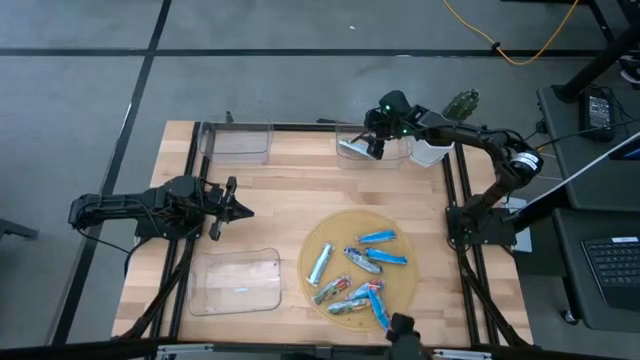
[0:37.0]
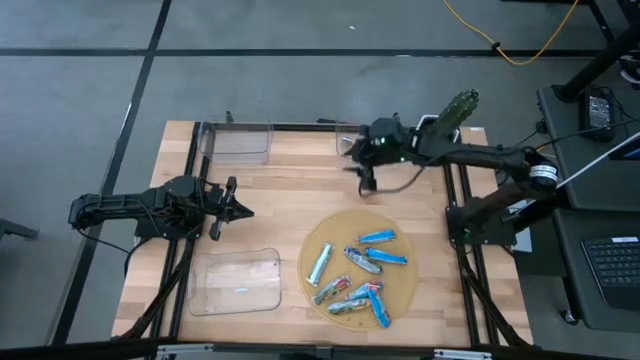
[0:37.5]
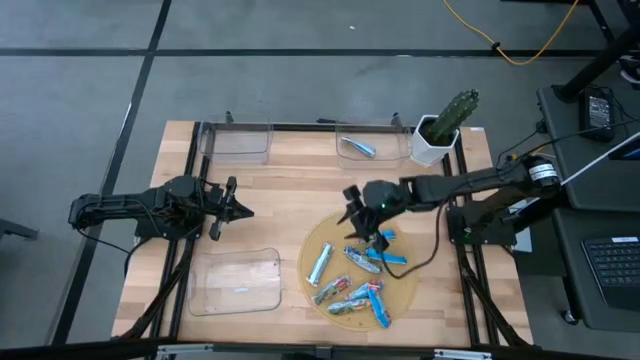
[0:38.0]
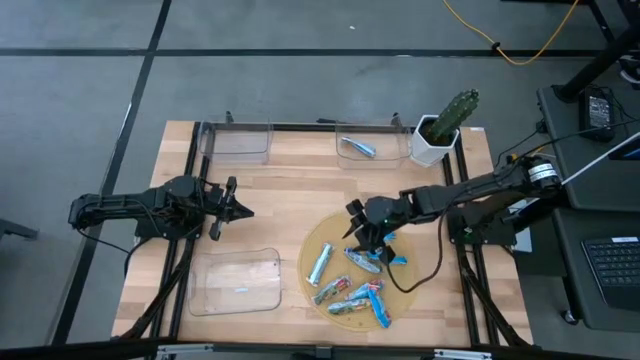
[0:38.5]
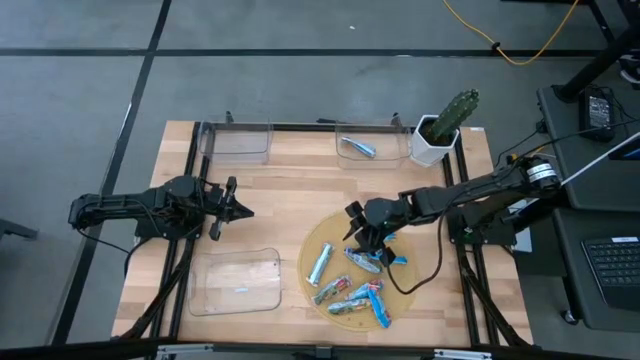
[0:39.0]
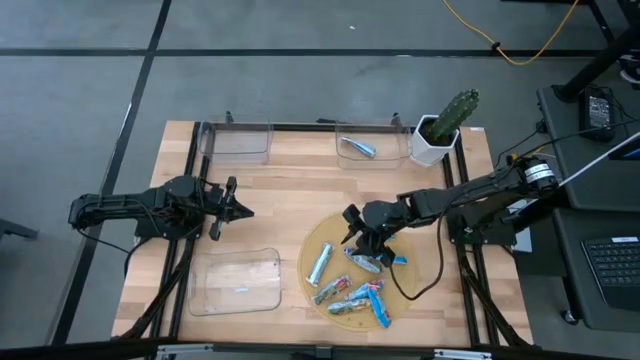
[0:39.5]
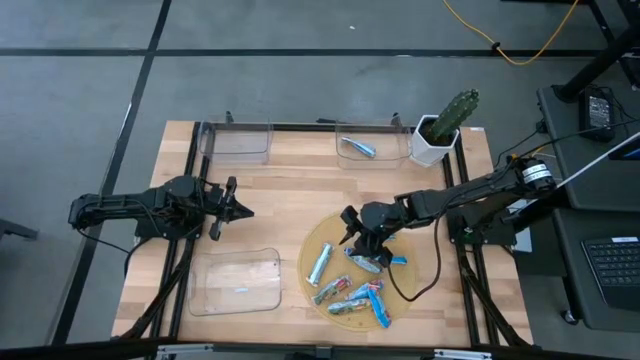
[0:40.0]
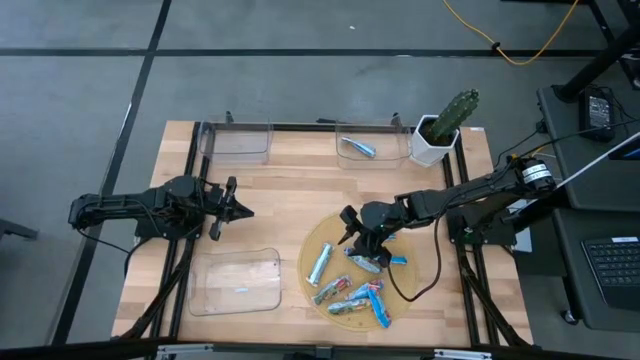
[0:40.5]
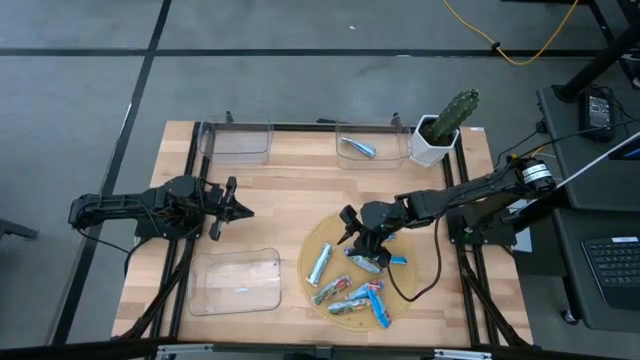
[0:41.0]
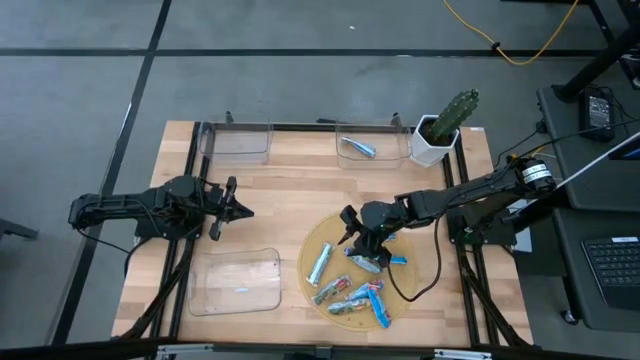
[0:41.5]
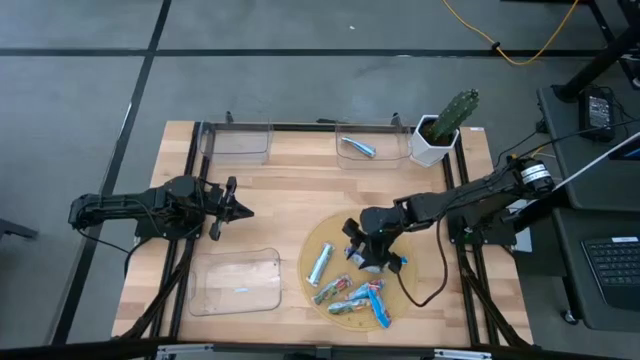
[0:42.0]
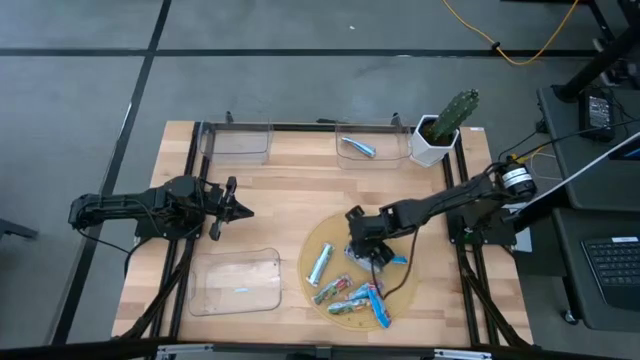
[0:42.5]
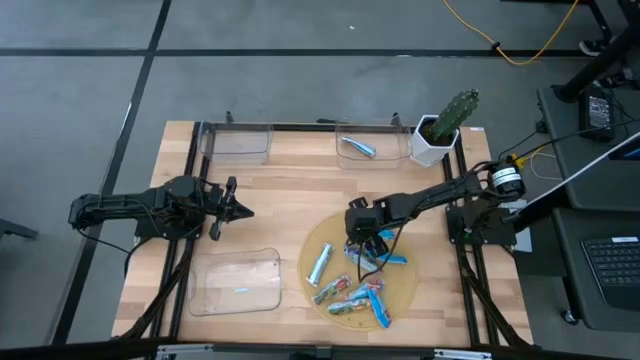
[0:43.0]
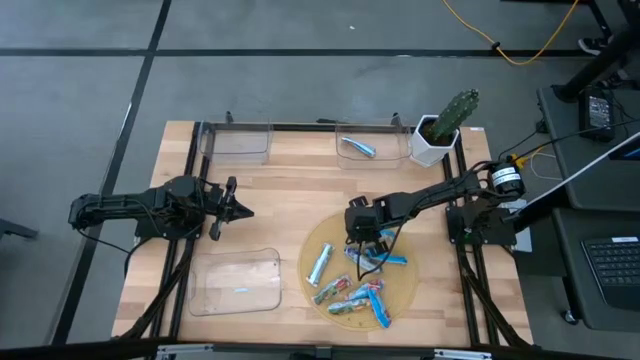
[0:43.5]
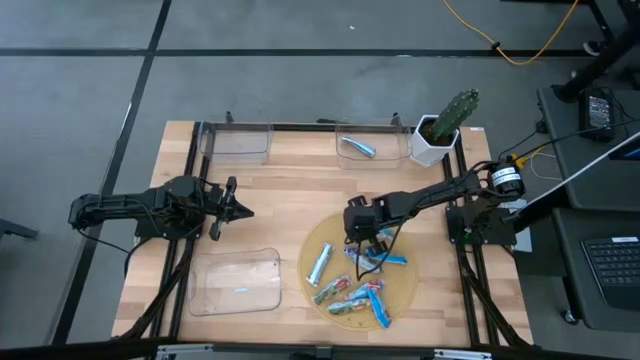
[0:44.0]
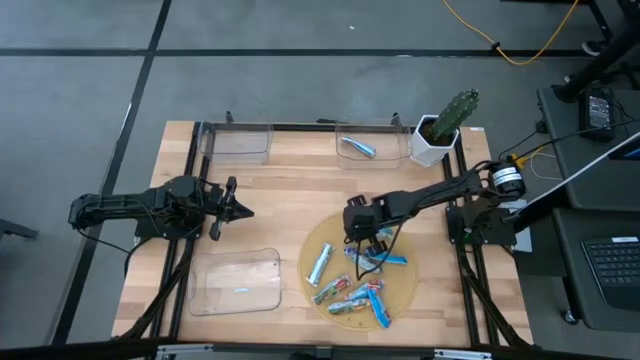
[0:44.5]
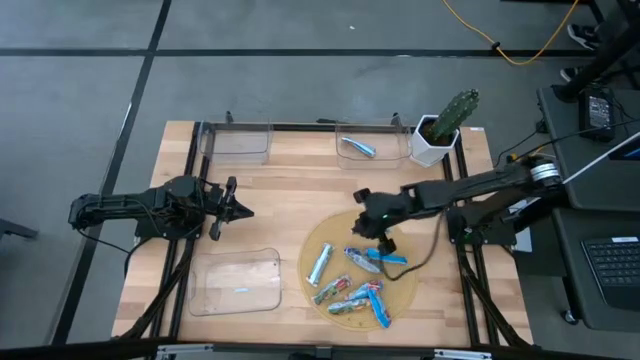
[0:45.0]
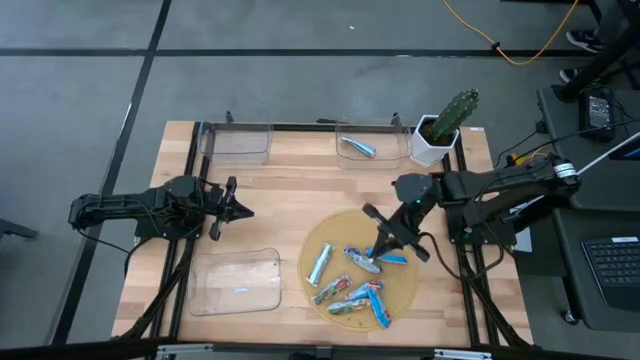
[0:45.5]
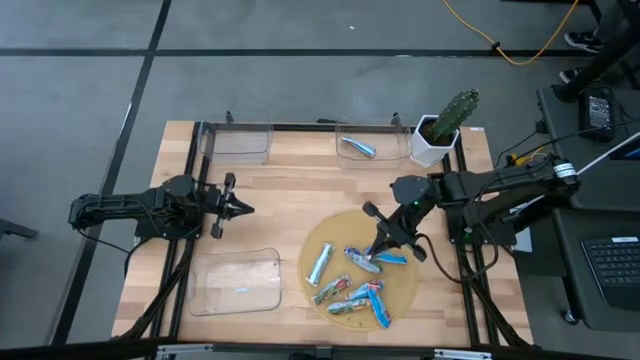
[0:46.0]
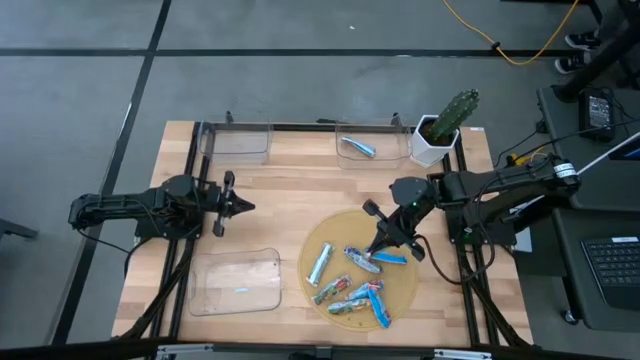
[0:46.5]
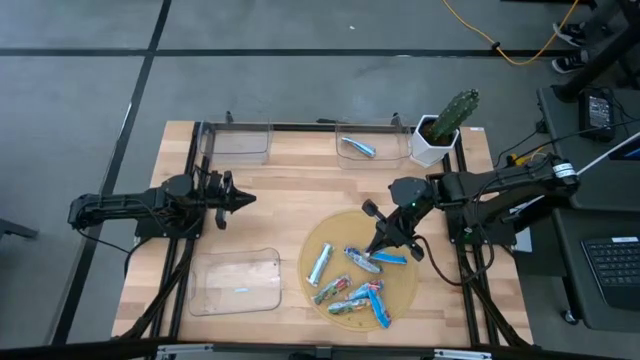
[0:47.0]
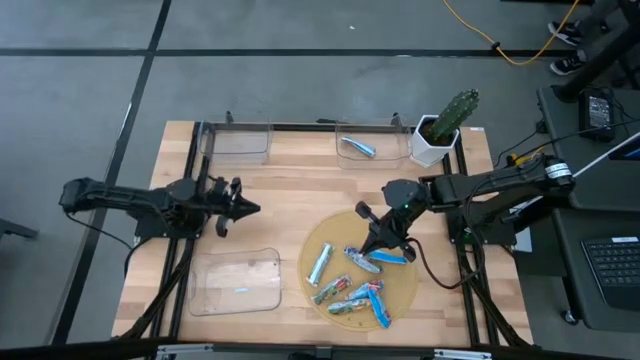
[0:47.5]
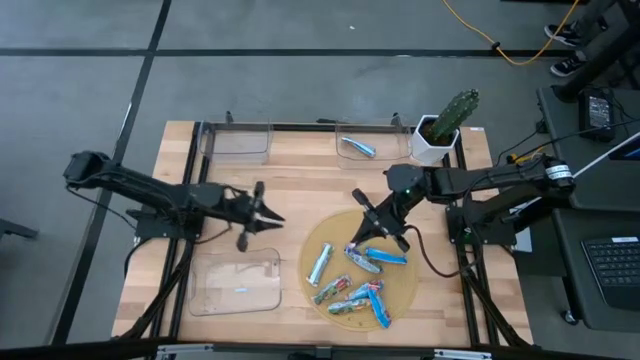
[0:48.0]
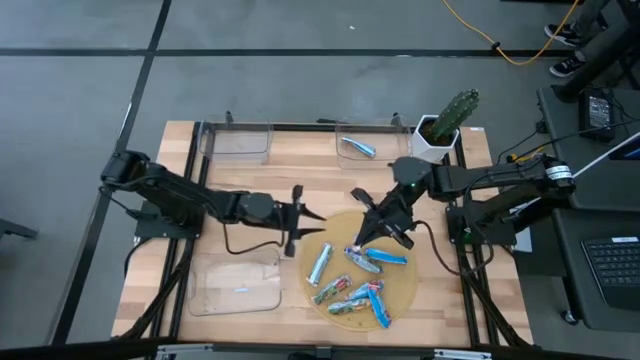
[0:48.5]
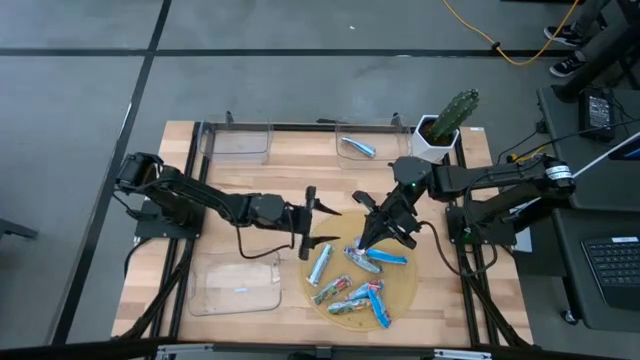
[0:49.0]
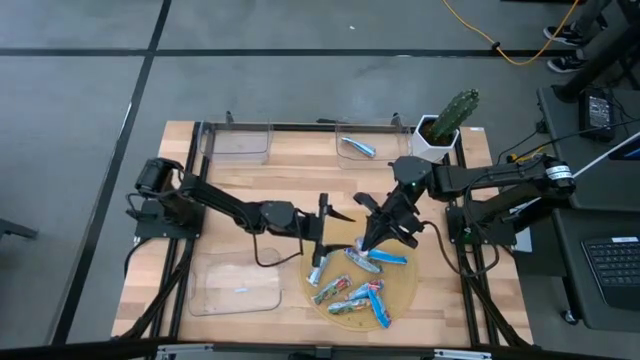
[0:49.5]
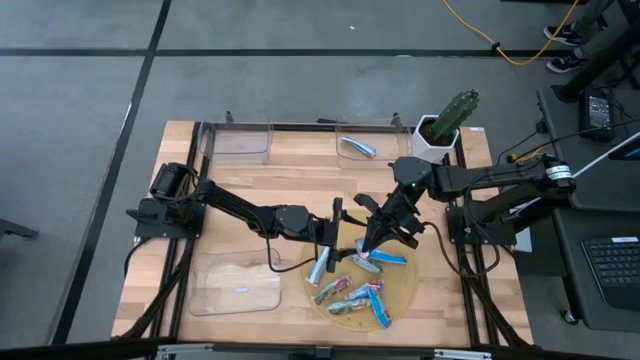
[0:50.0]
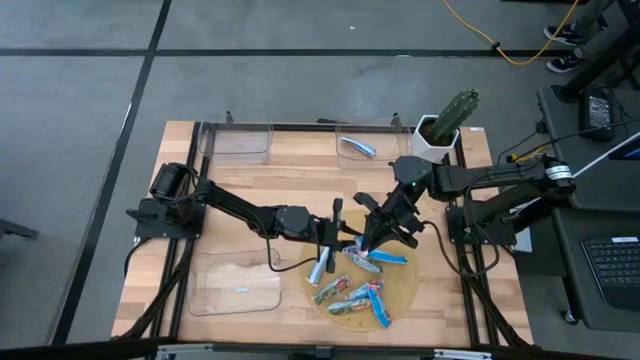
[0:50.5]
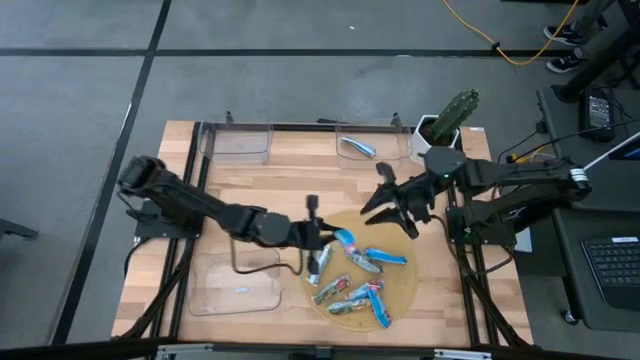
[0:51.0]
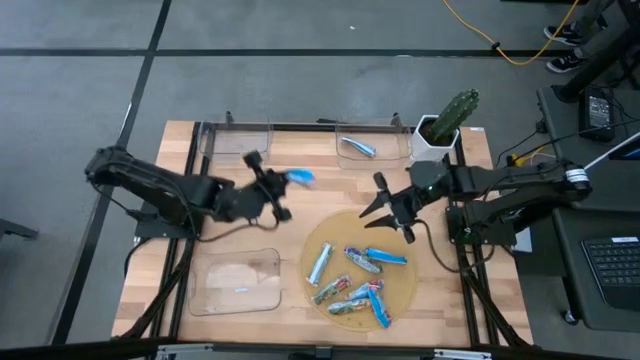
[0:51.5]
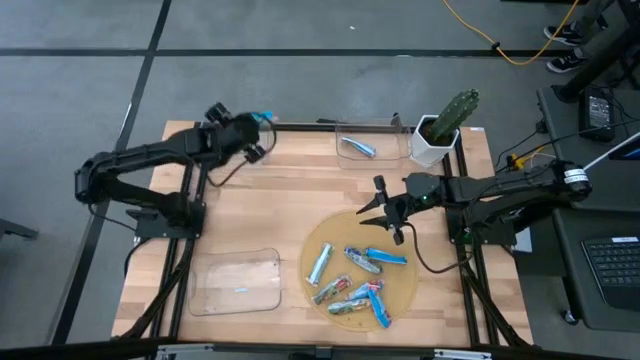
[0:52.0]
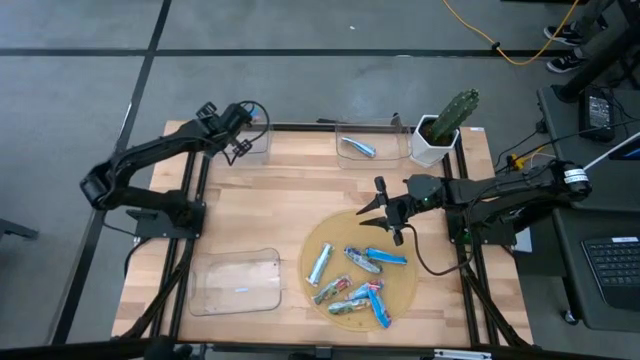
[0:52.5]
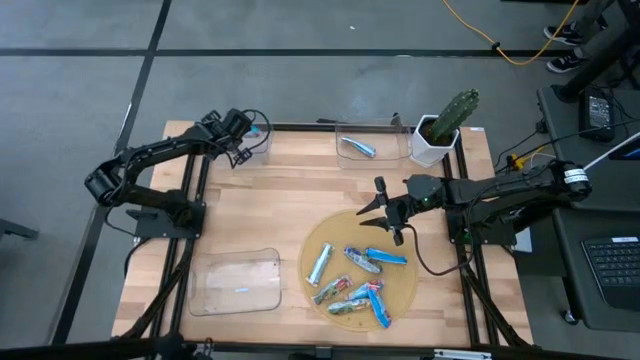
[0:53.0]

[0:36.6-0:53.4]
Task: Pick and place Granola Bars by type
Put the red granola bar into the top left transparent bin

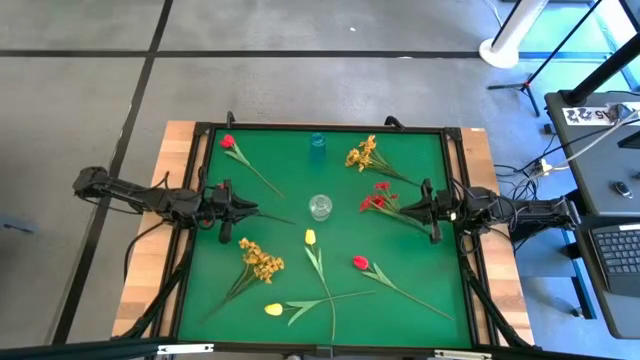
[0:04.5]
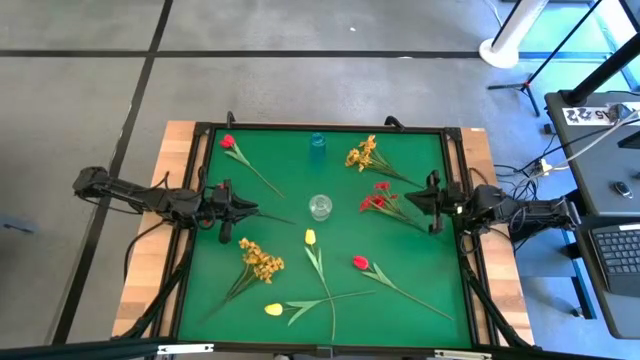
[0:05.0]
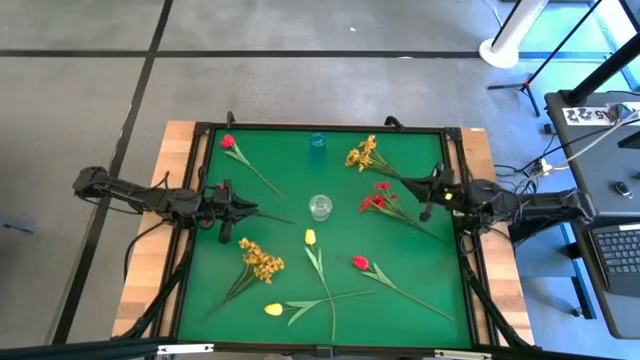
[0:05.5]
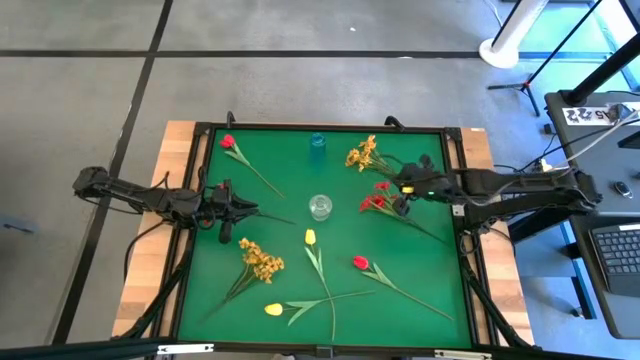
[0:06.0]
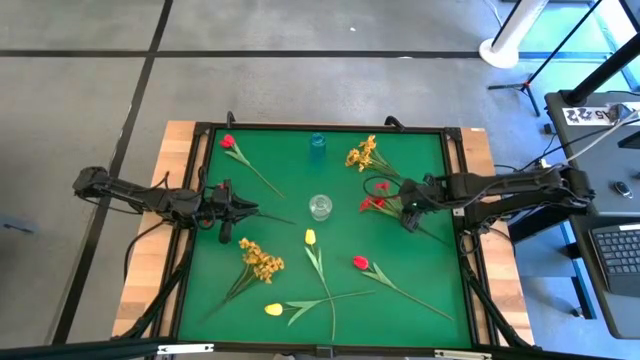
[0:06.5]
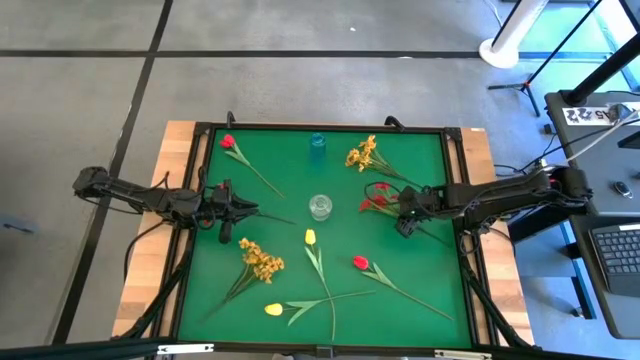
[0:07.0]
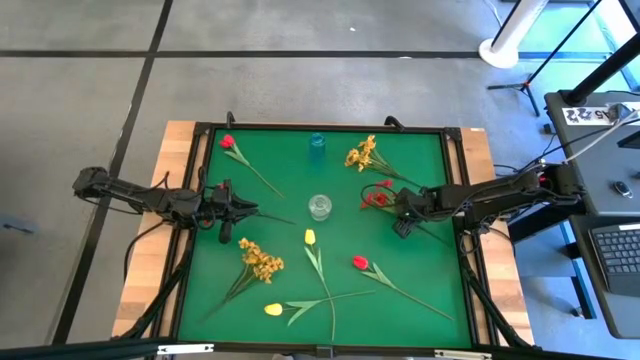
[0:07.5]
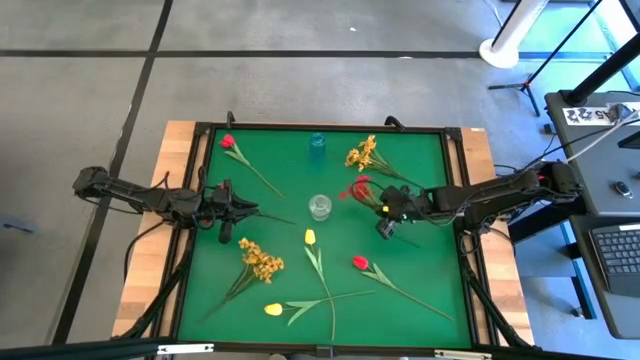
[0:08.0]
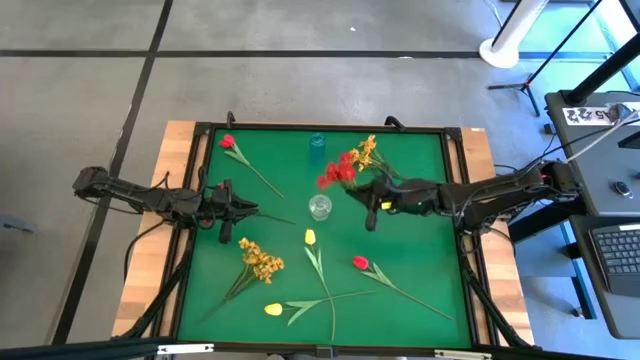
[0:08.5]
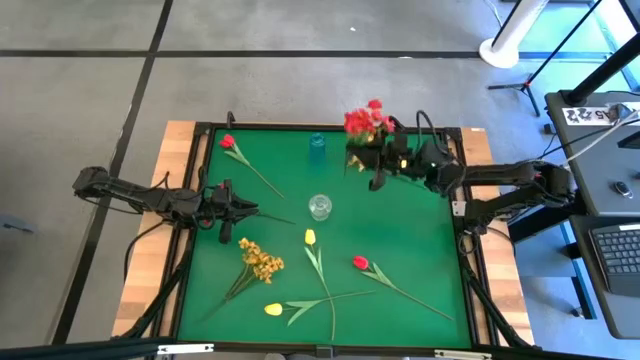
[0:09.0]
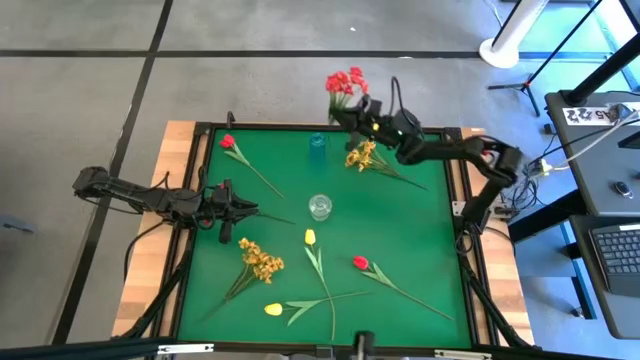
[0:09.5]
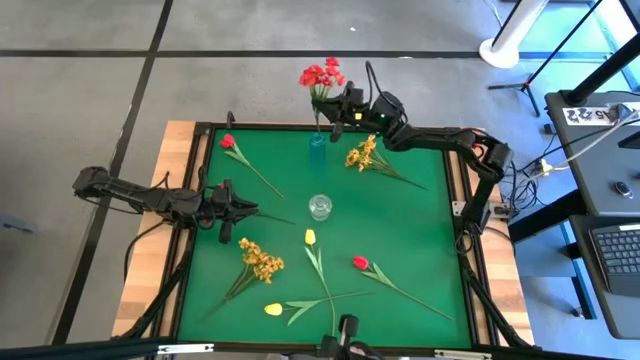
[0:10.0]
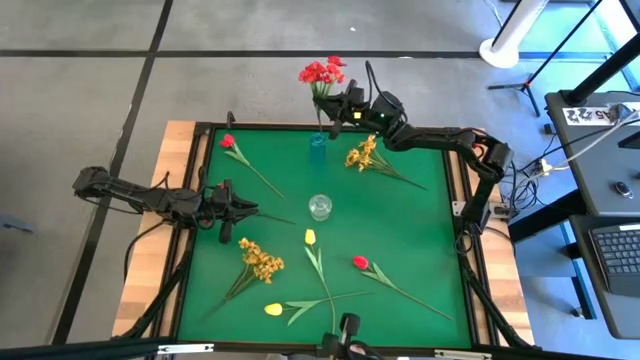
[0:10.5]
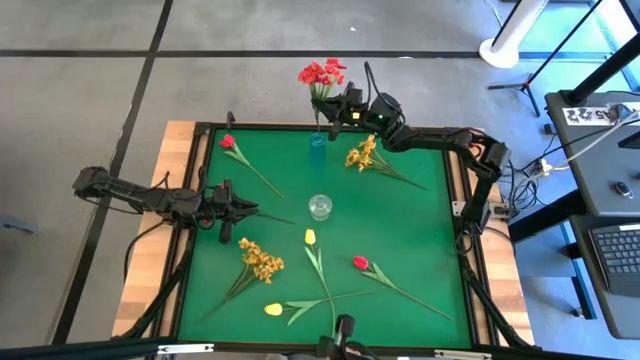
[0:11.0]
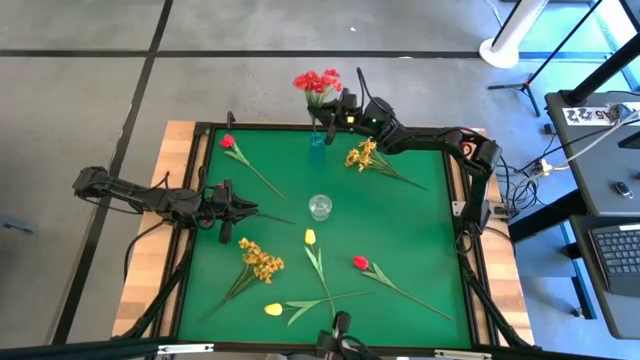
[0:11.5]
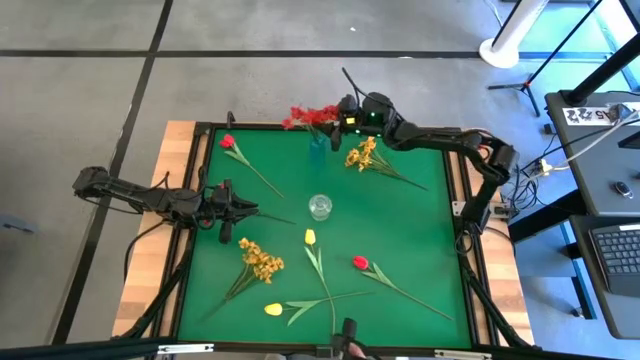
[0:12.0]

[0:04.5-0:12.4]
Task: Sort flowers into vase by color
Put the right red flowers into the blue vase
